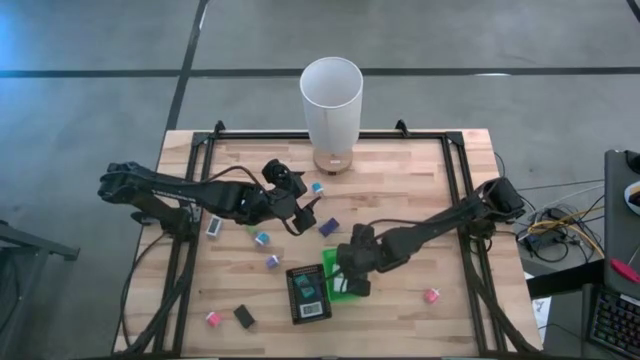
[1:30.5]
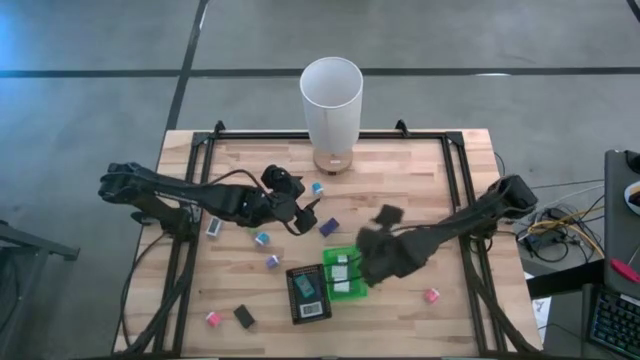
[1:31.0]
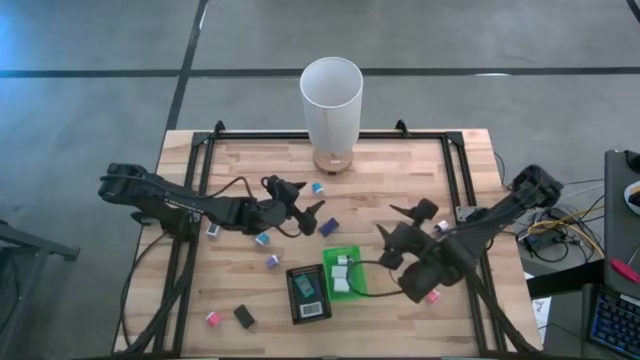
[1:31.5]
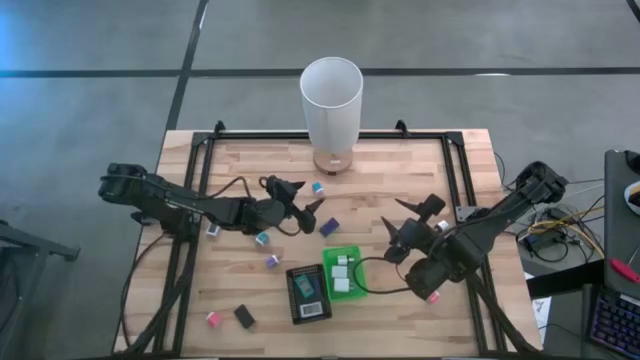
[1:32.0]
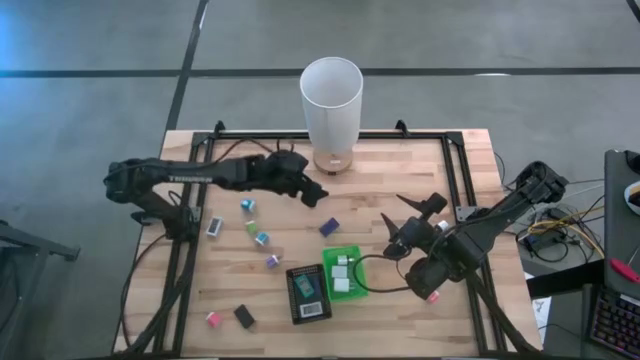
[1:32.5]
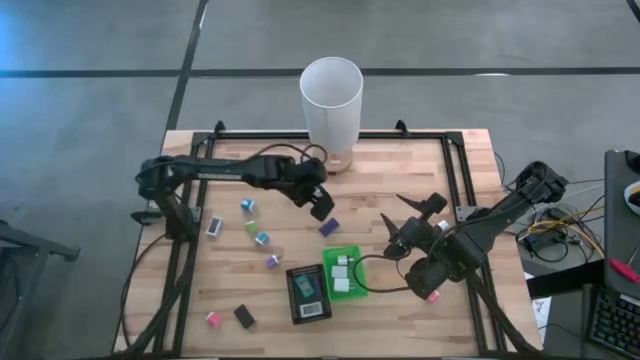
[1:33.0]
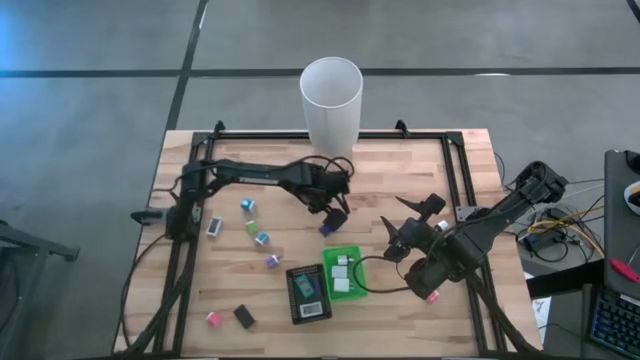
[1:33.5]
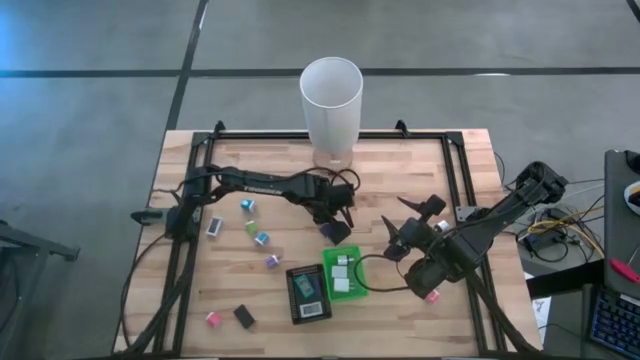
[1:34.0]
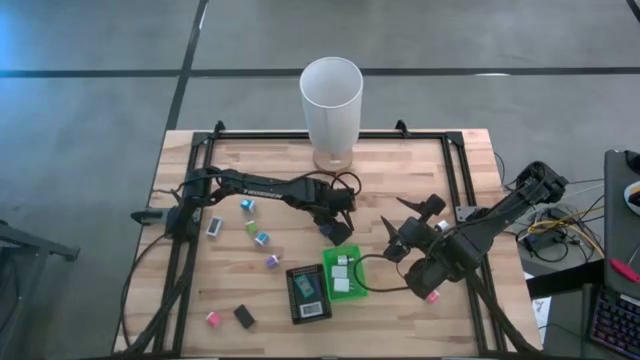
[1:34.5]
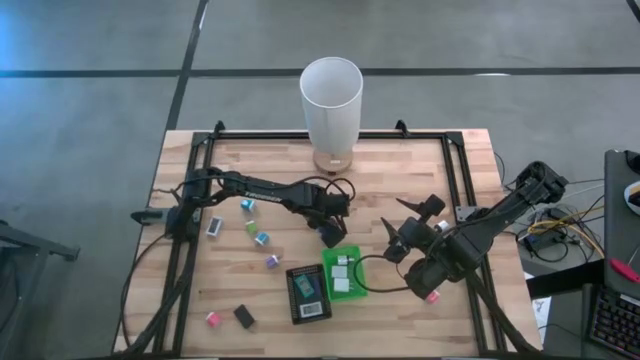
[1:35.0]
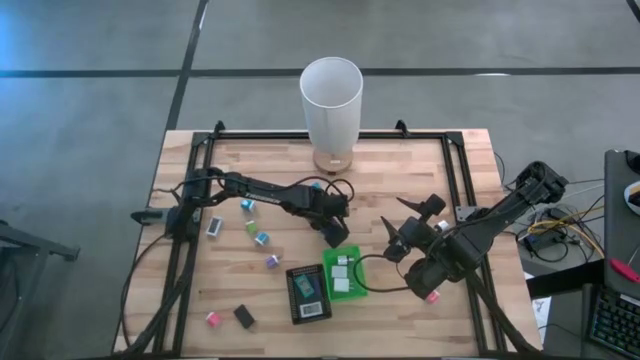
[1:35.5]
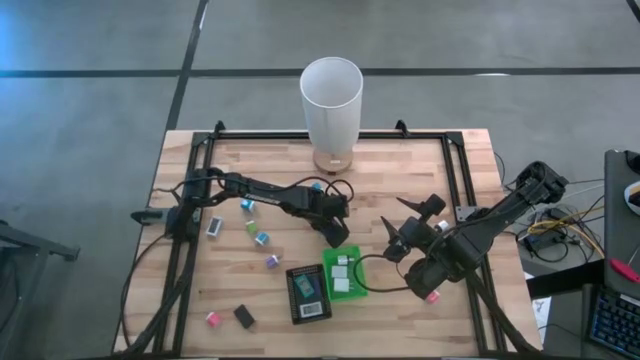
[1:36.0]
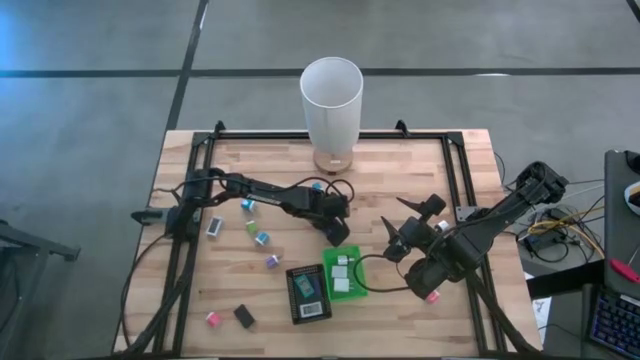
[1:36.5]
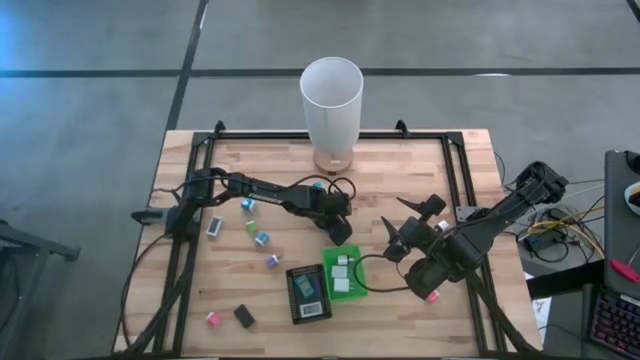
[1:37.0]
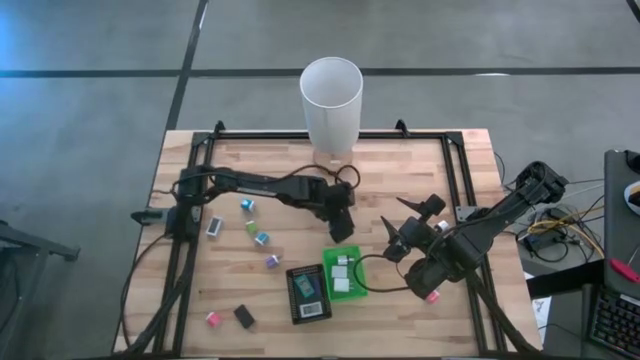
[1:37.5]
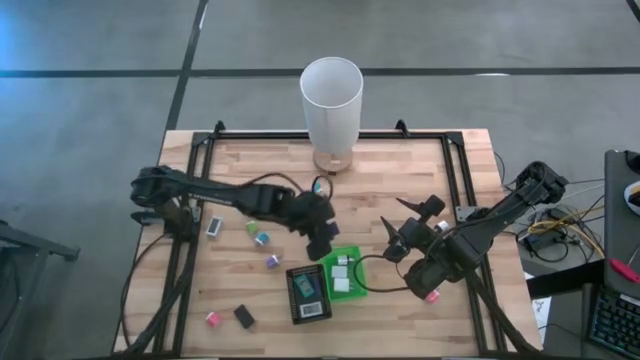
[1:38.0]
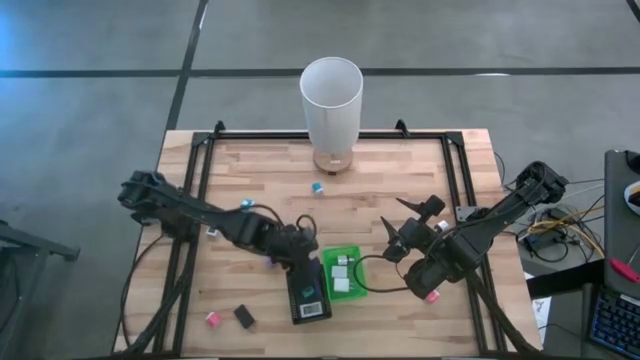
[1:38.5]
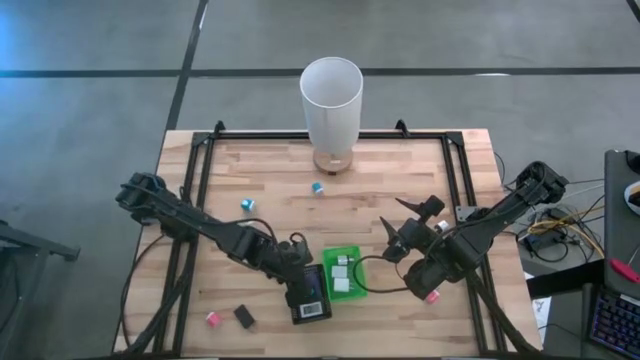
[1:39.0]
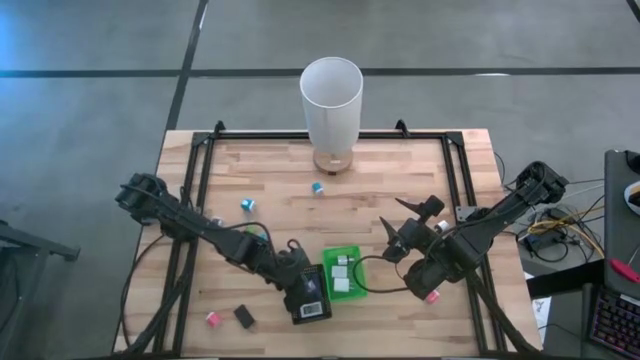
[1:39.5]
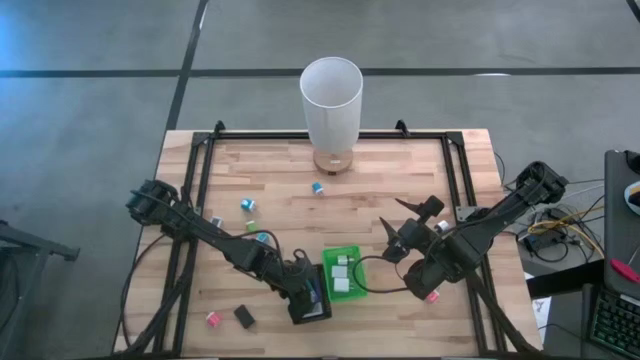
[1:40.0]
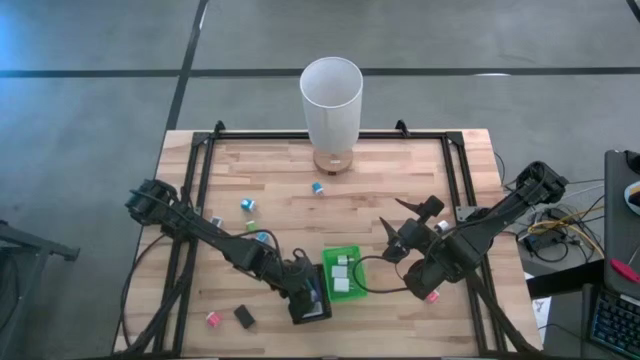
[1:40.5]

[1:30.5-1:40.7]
Task: Pick & Place Office items
Put the dark blue digital clock into the black bin

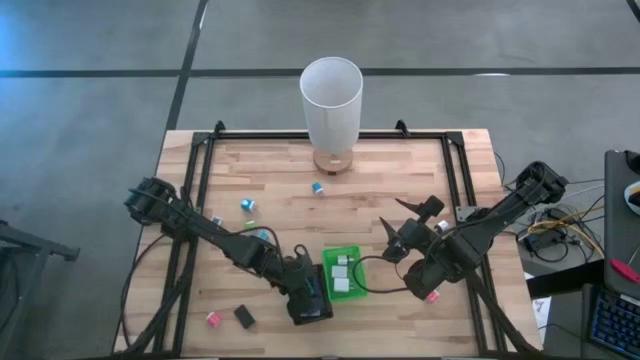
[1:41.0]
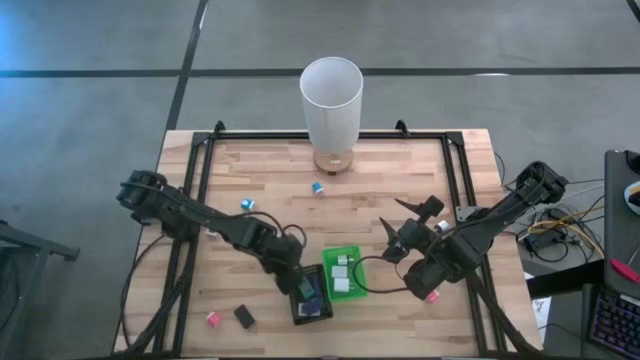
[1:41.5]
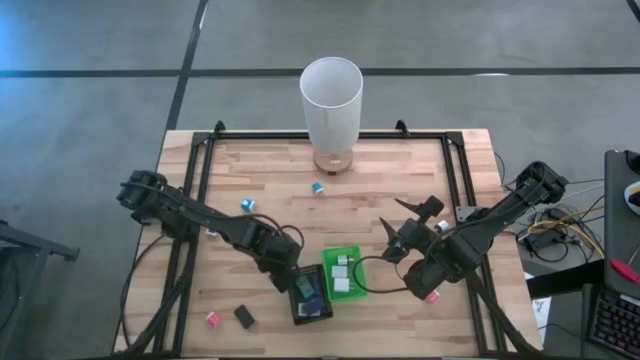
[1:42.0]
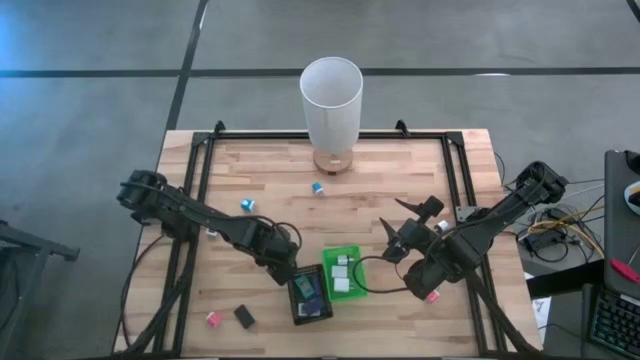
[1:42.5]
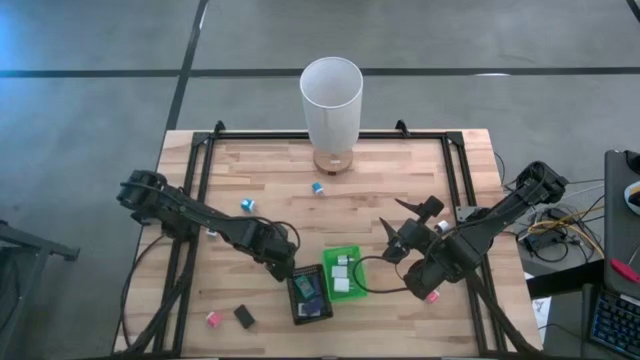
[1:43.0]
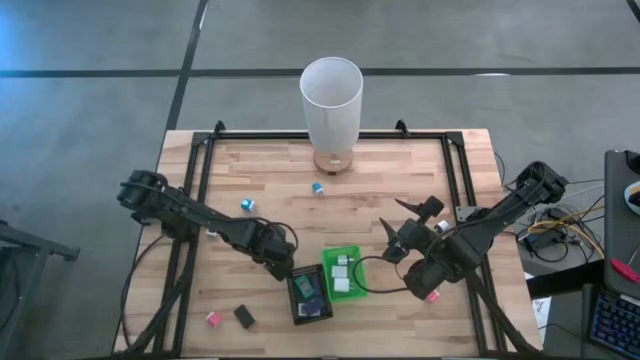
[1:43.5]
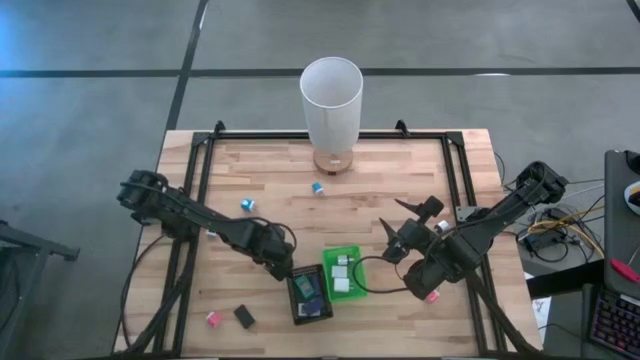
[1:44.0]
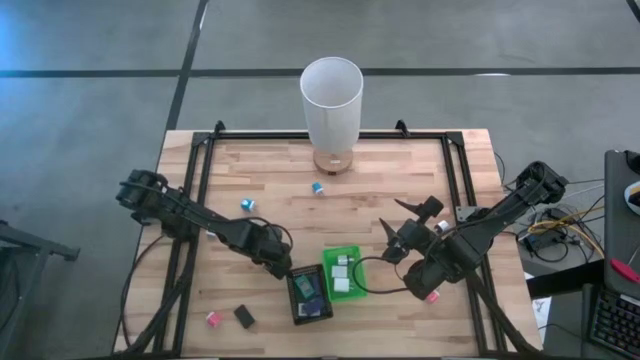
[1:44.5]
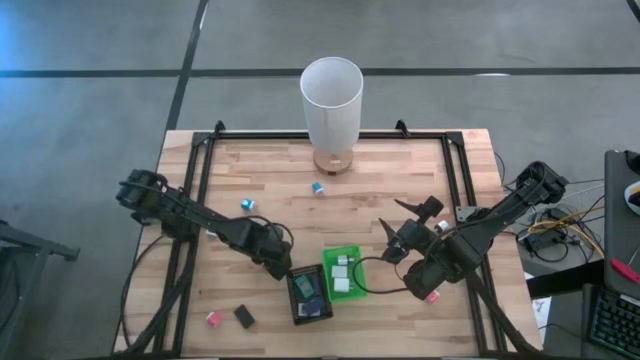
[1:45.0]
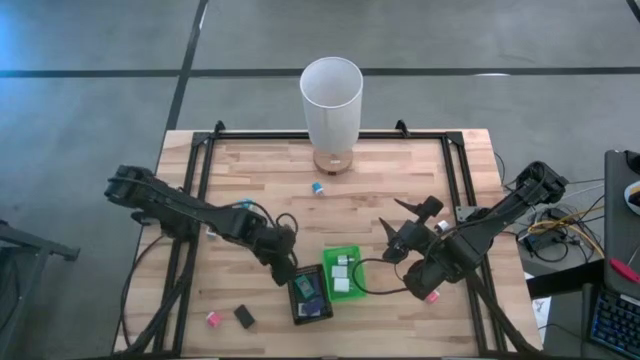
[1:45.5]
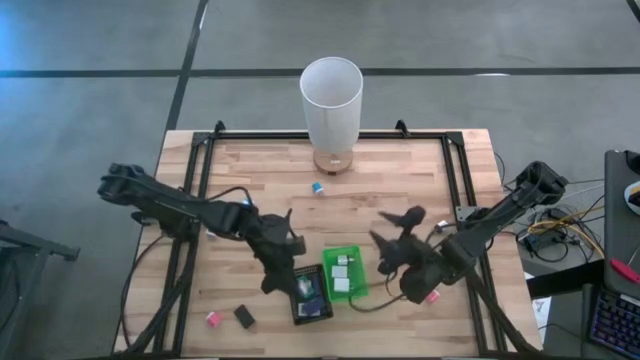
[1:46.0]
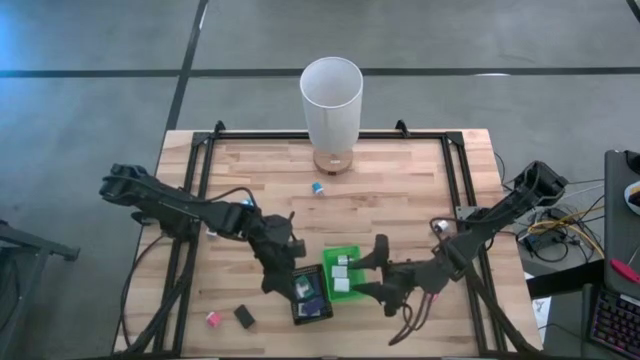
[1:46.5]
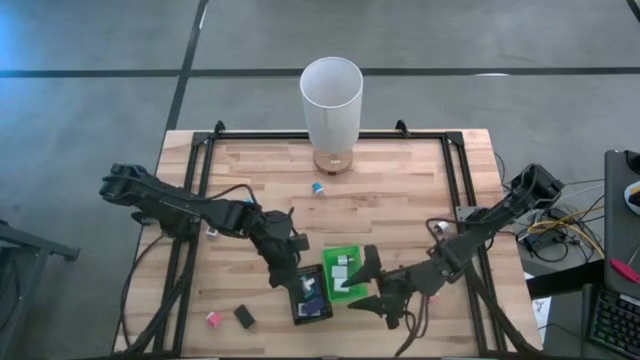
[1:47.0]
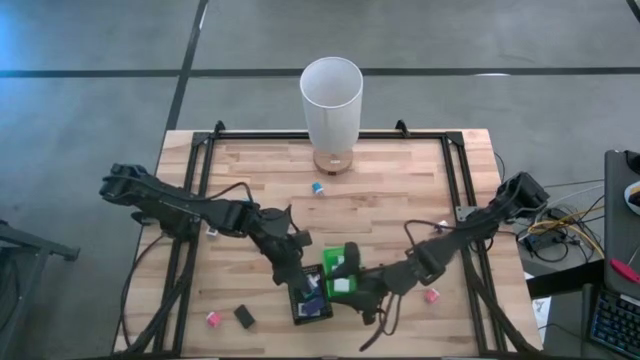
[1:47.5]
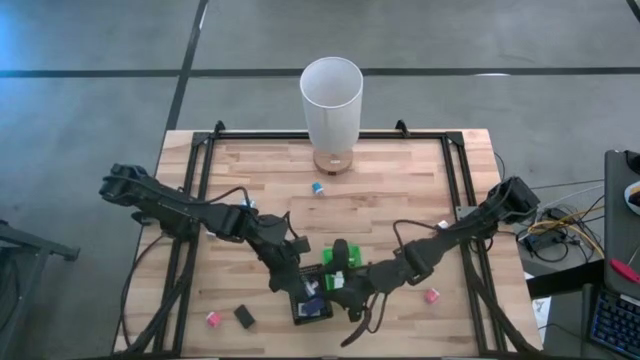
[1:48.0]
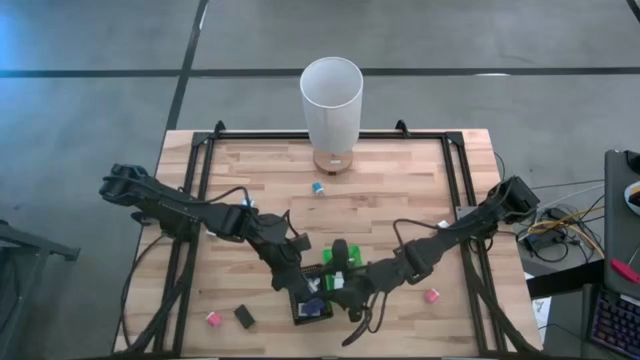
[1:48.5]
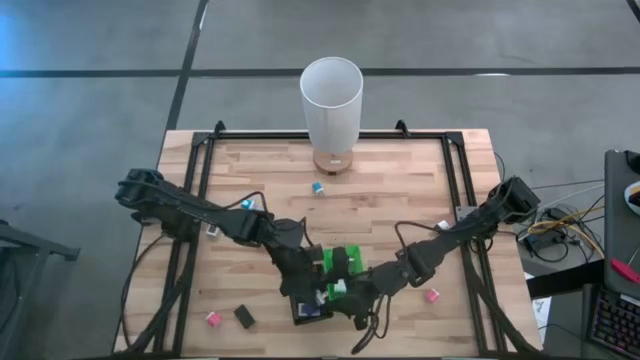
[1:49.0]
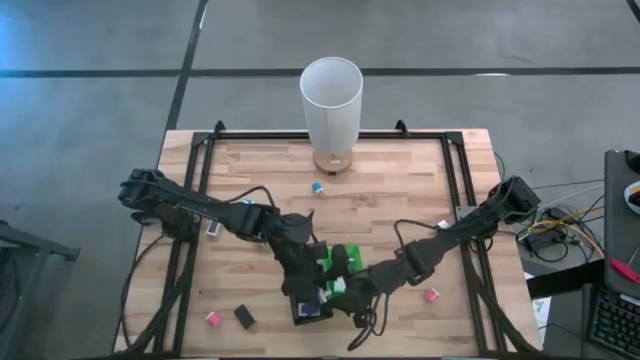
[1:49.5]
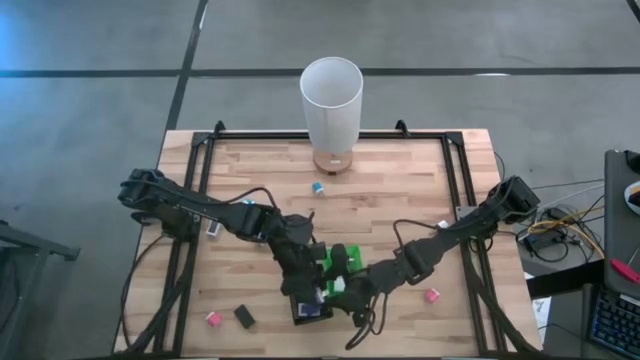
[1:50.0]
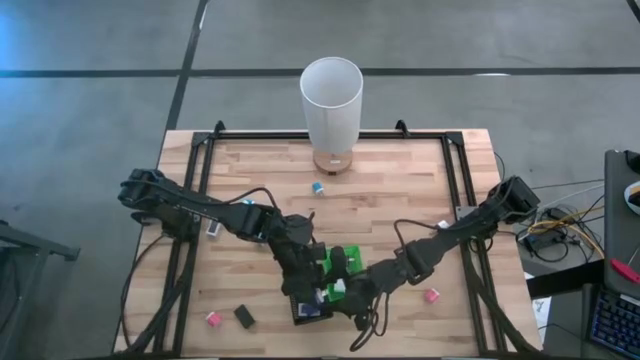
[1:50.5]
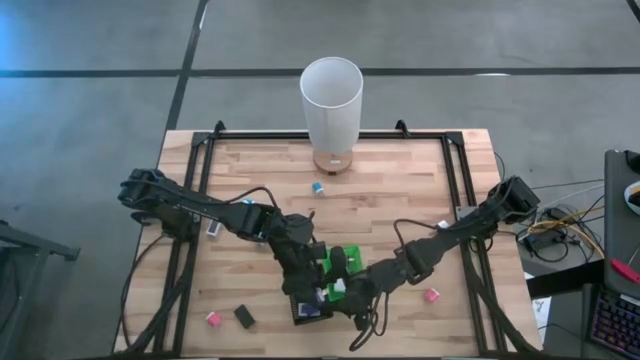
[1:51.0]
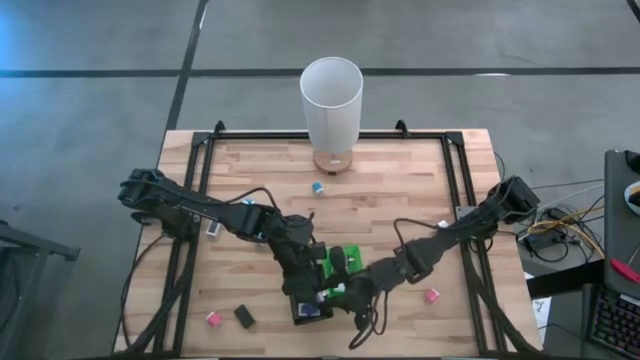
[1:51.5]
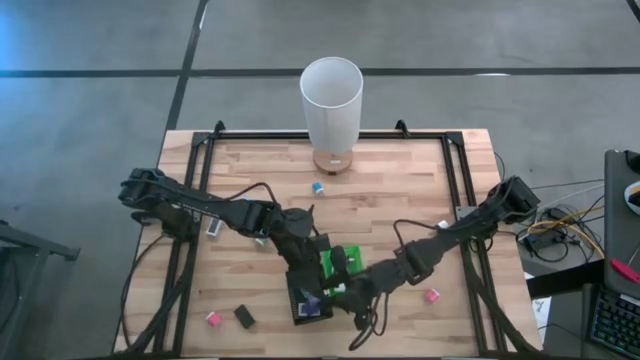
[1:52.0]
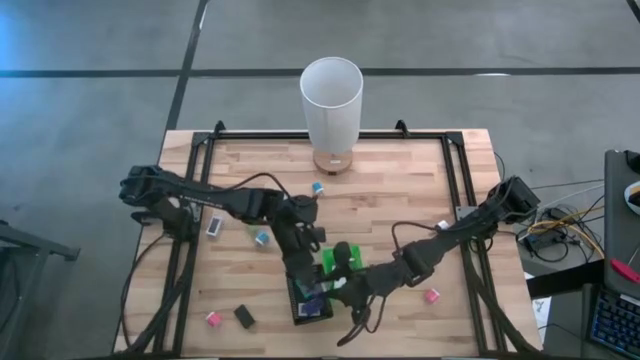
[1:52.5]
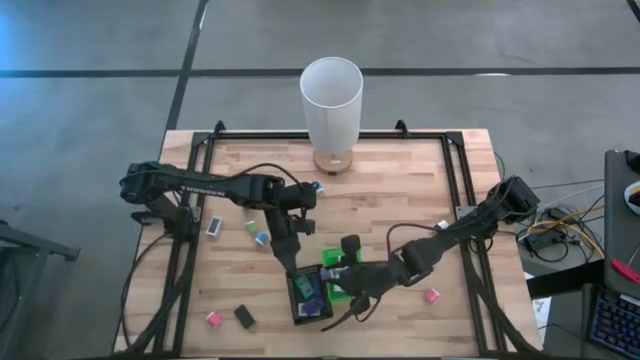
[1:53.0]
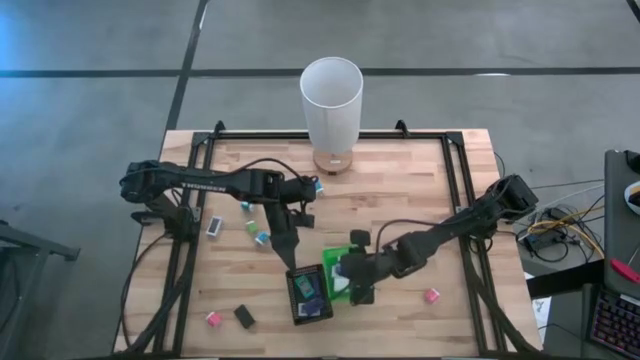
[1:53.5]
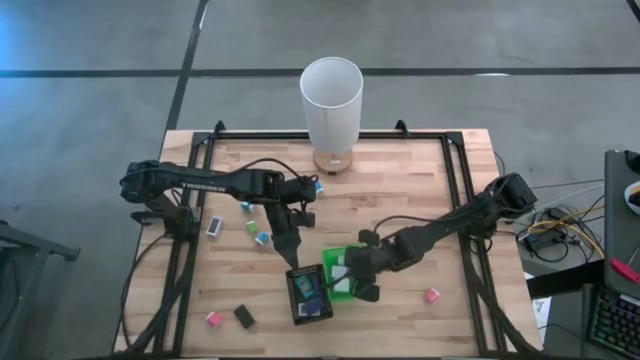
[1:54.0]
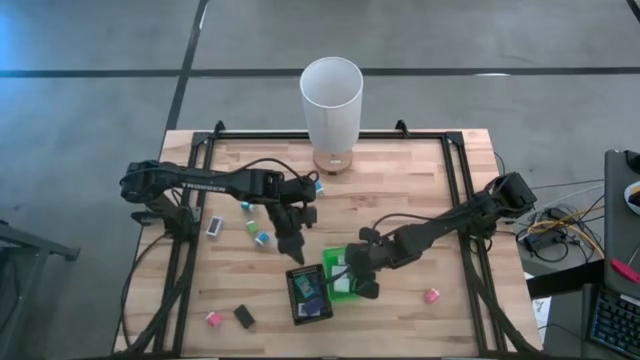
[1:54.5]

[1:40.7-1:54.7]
Put the purple charger adapter into the green bin
